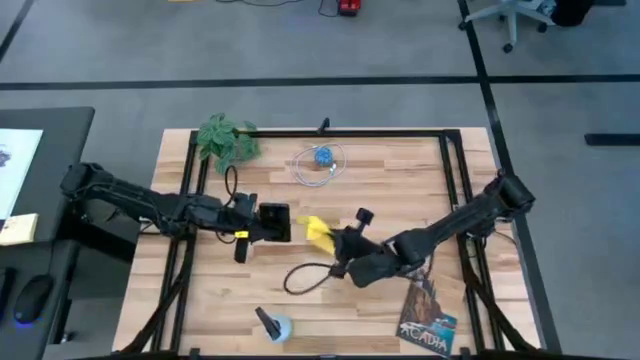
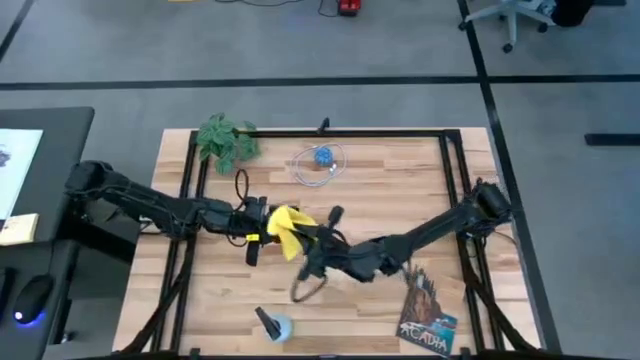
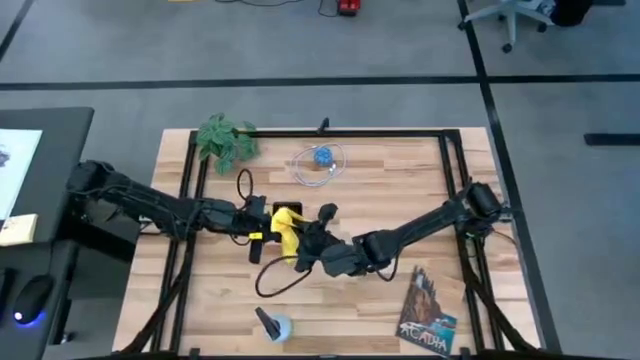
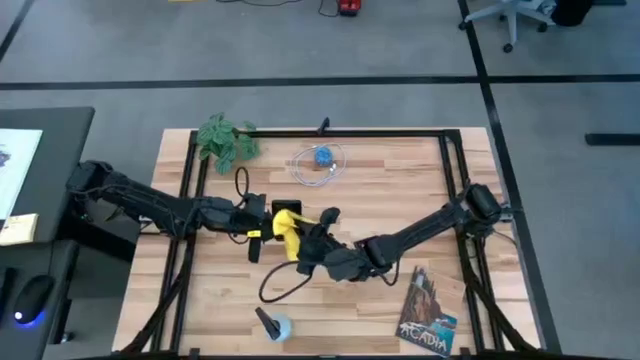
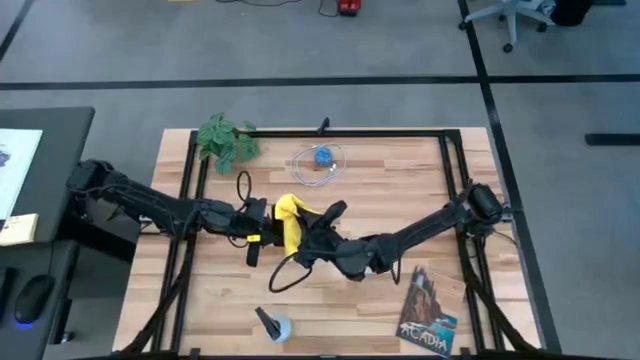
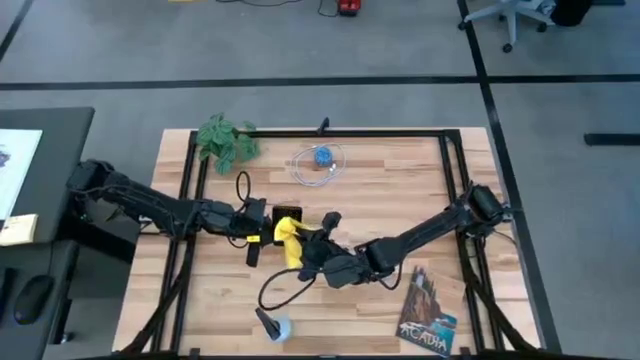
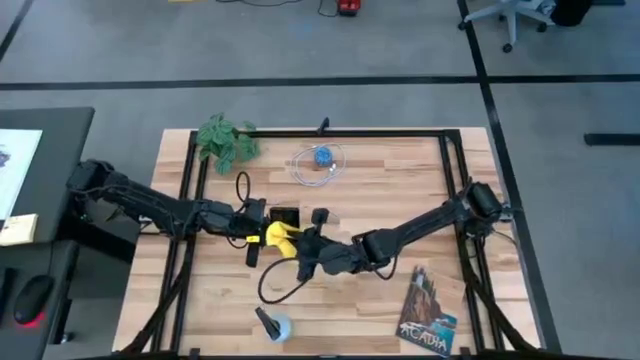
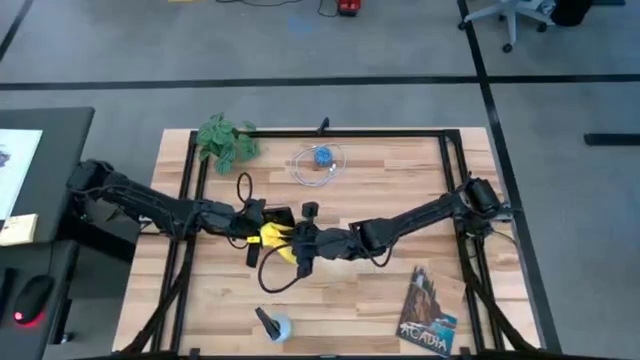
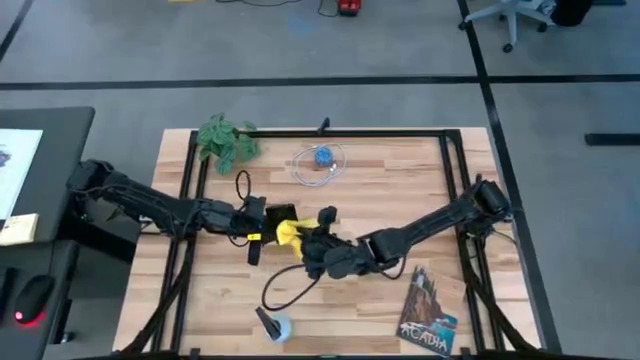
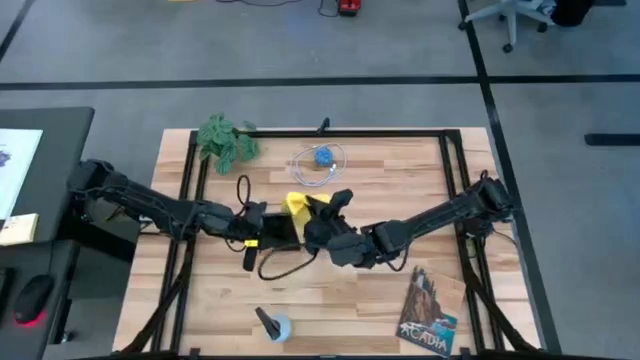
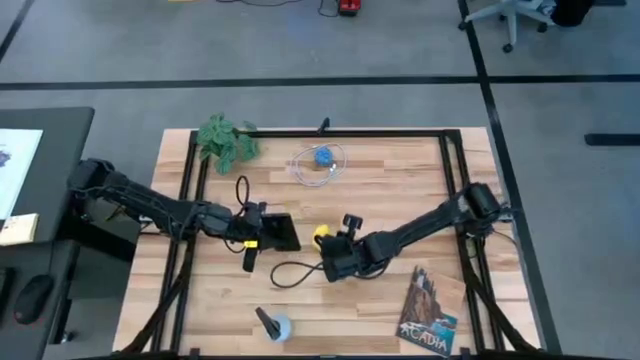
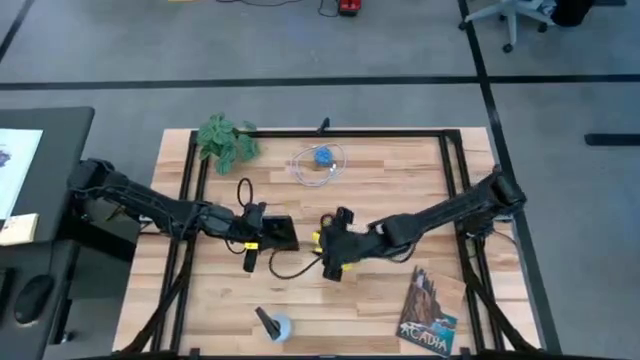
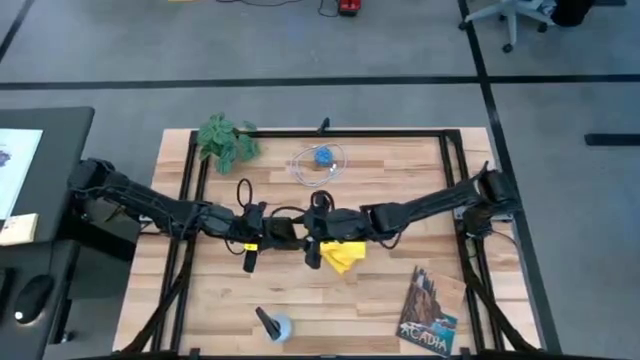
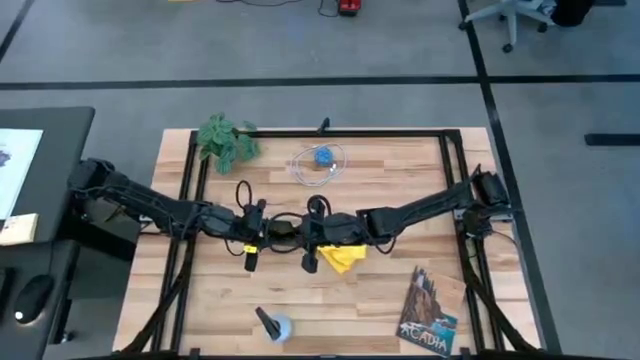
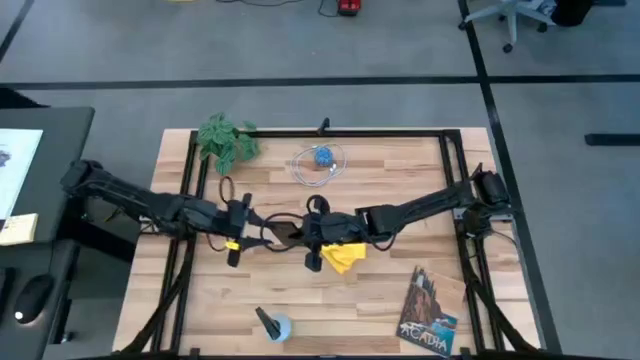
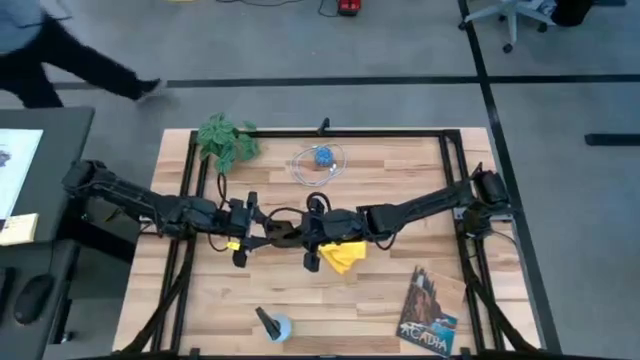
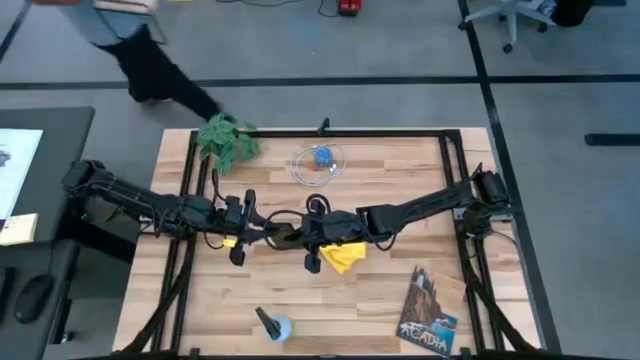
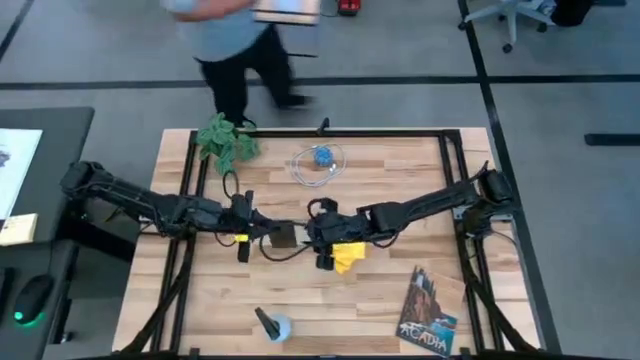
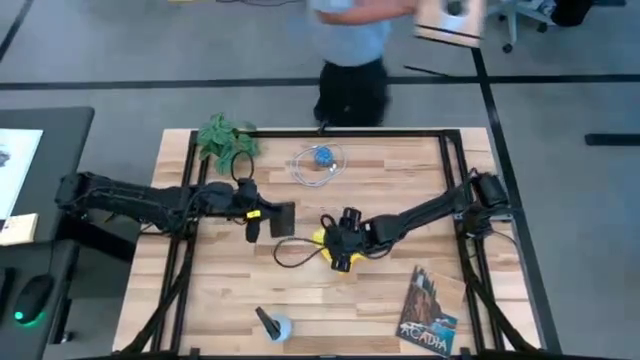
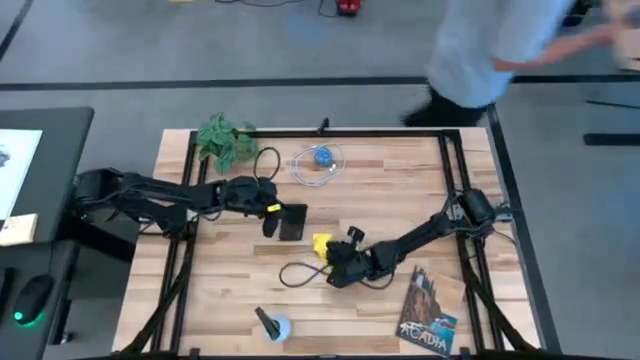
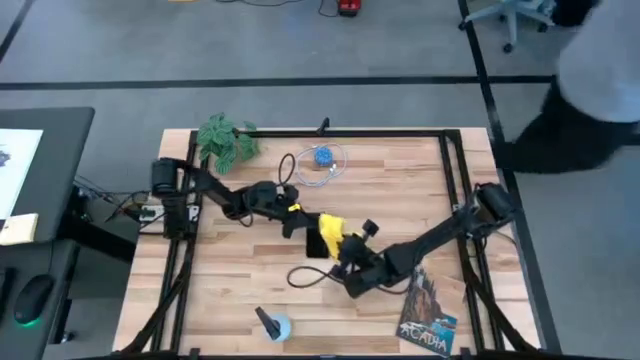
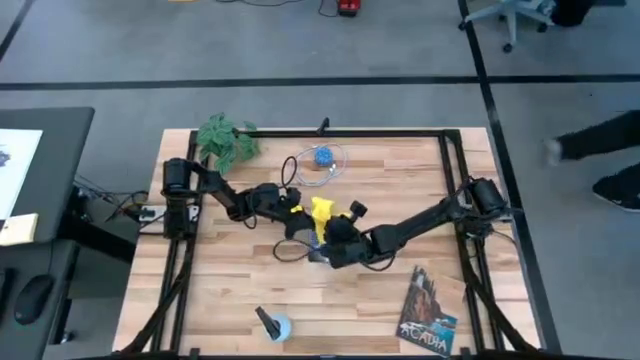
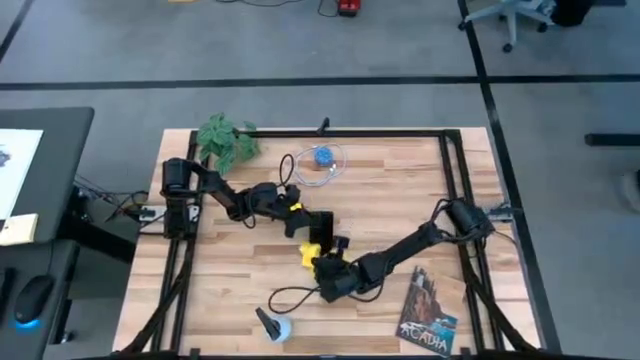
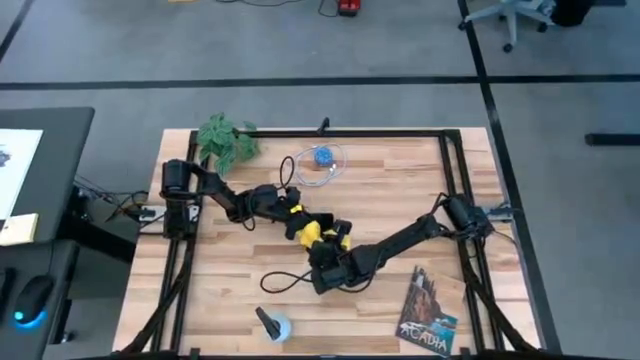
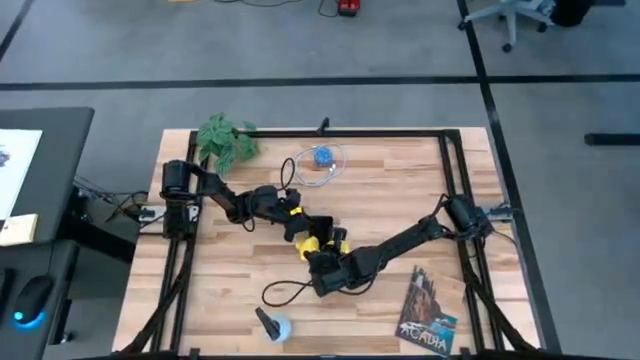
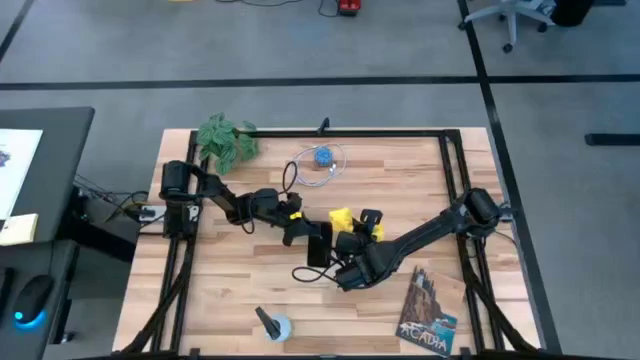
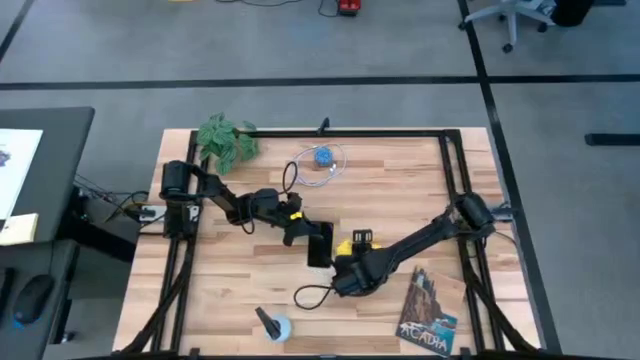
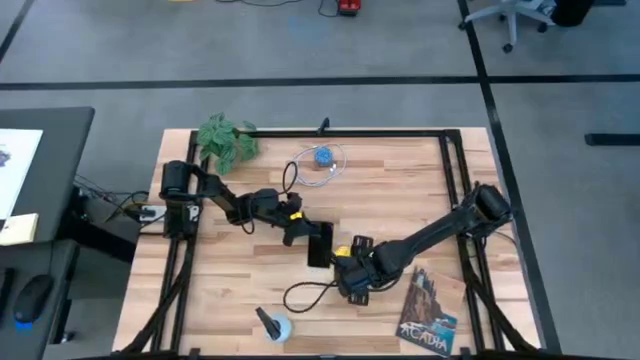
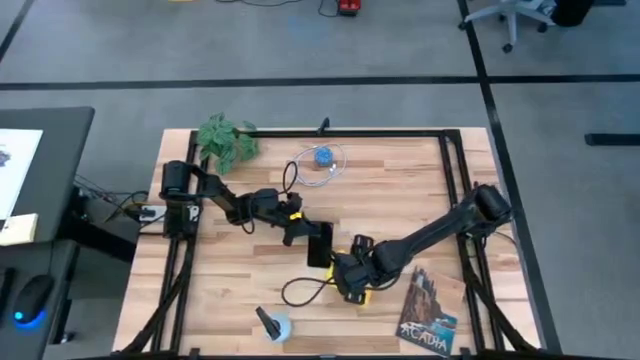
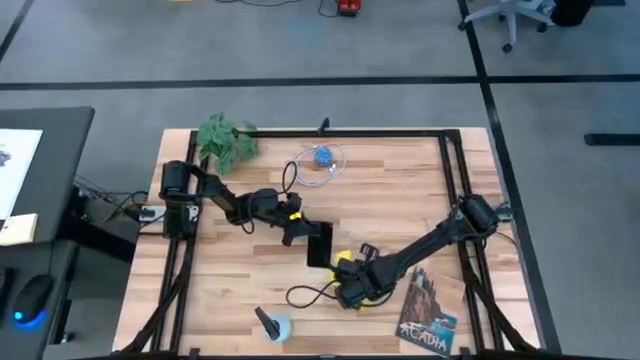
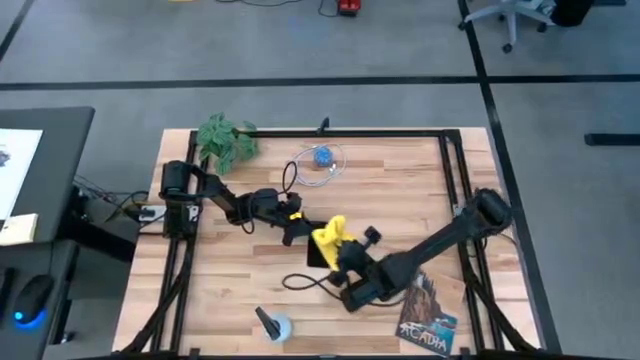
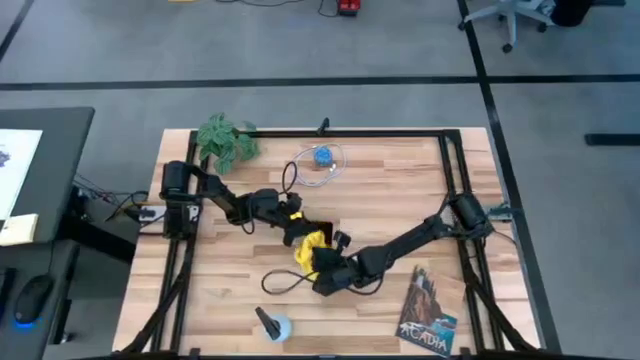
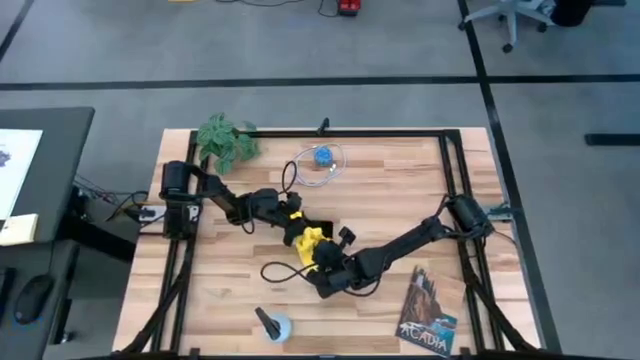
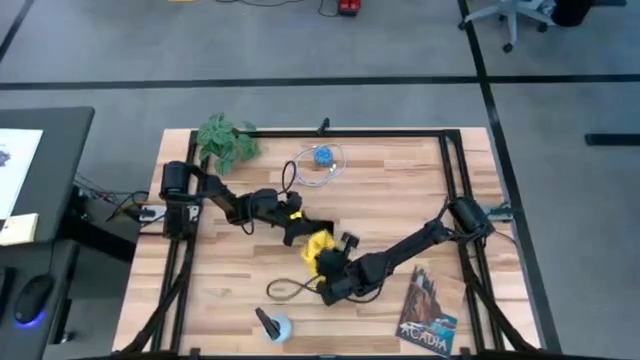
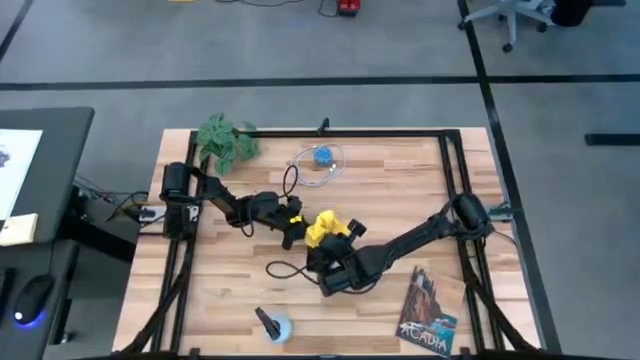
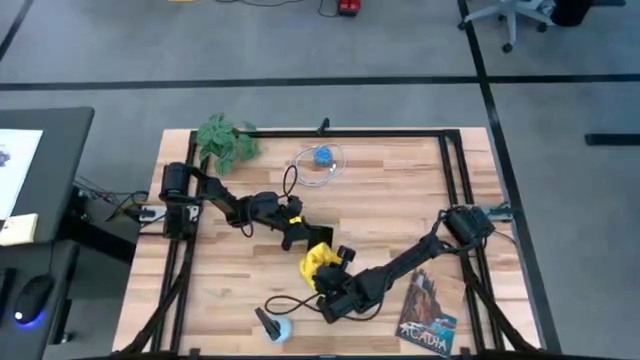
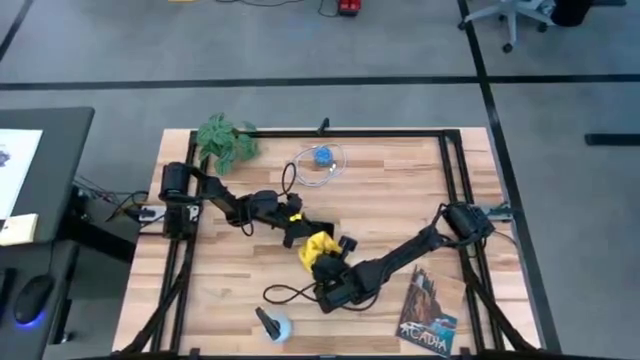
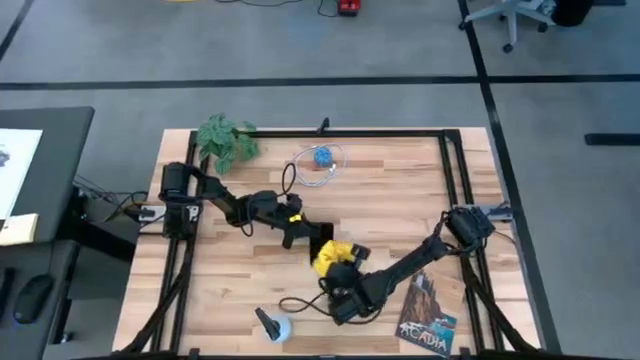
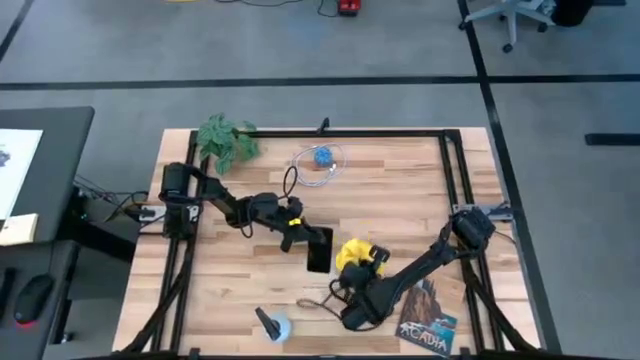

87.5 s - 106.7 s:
Task: Apply microfiber cloth
Wipe the cellphone using a microfiber cloth

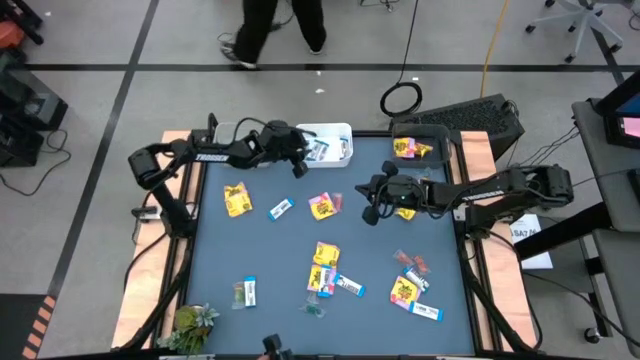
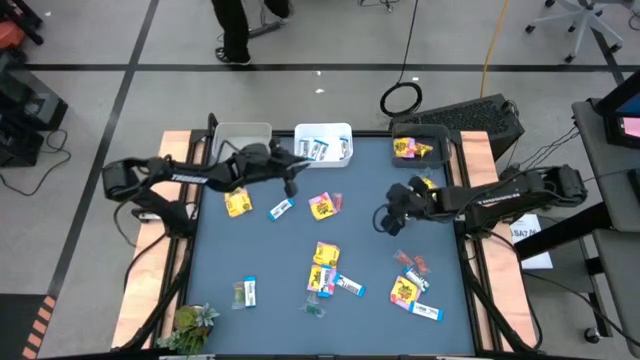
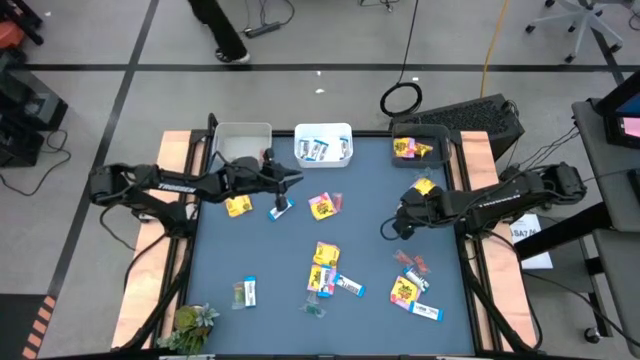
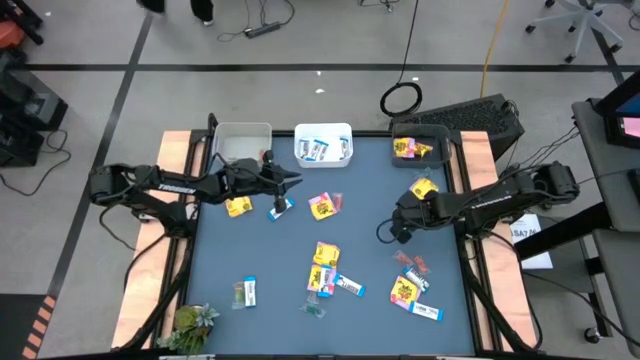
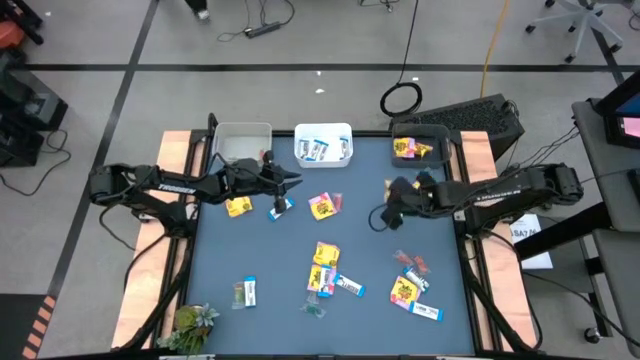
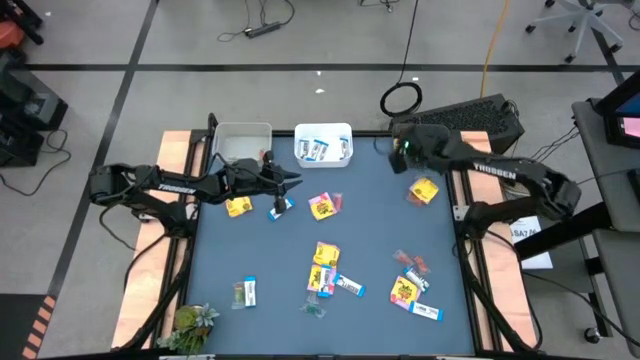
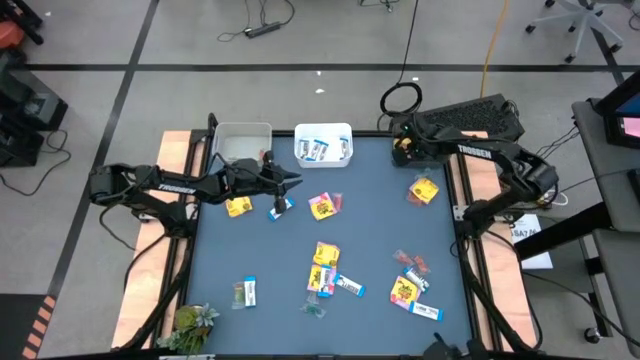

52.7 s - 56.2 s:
Task: Sort candy
Put the yellow candy into the black bin
